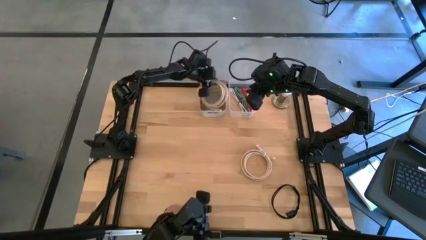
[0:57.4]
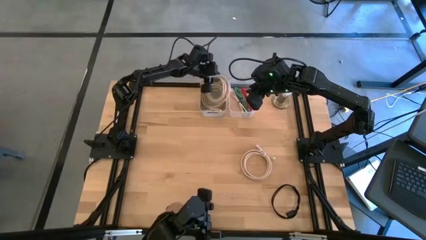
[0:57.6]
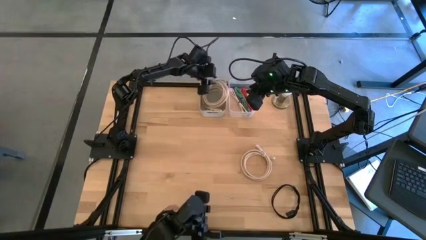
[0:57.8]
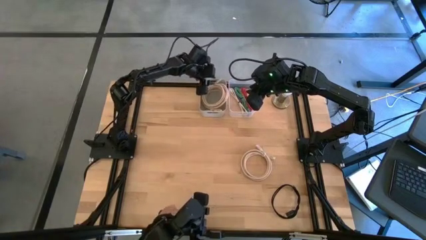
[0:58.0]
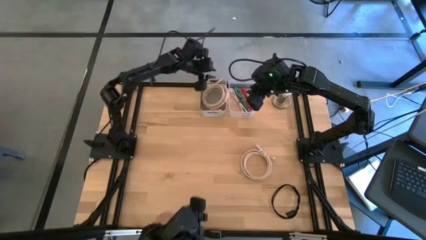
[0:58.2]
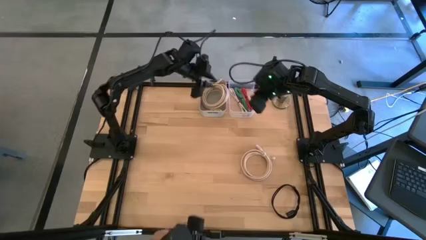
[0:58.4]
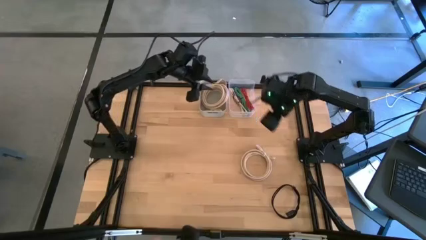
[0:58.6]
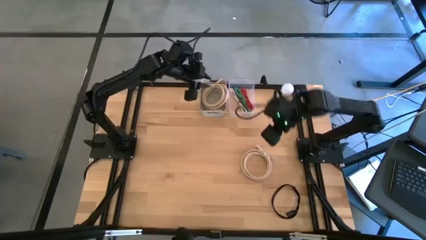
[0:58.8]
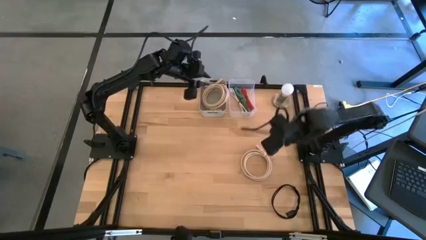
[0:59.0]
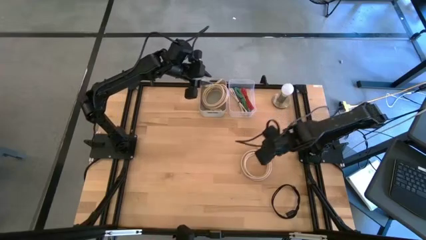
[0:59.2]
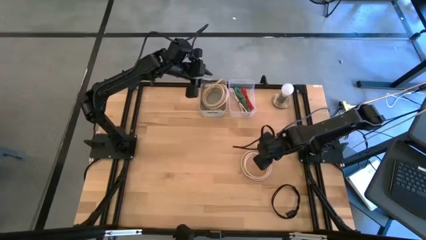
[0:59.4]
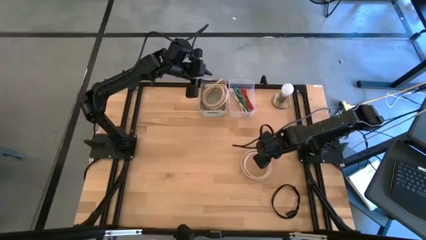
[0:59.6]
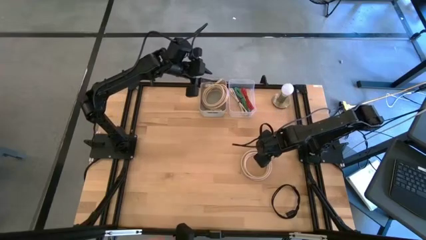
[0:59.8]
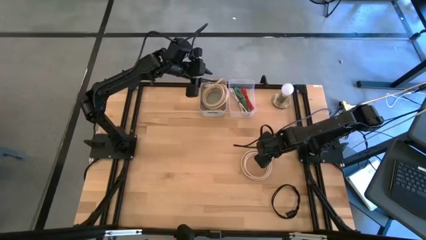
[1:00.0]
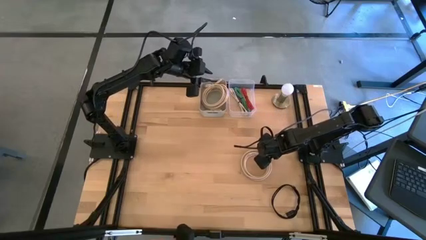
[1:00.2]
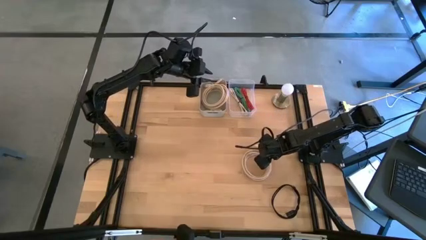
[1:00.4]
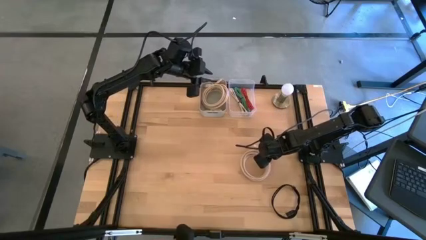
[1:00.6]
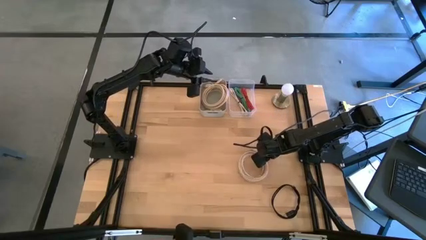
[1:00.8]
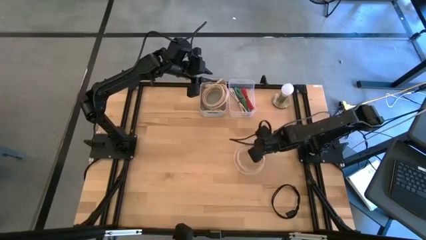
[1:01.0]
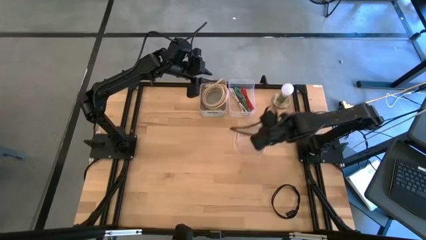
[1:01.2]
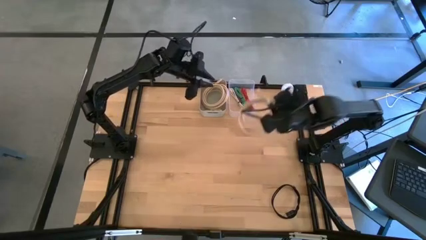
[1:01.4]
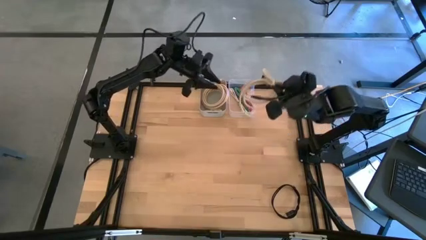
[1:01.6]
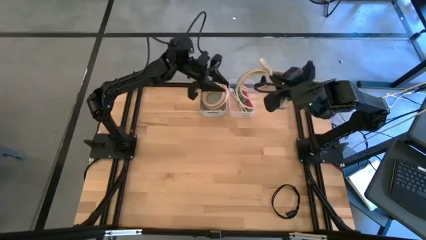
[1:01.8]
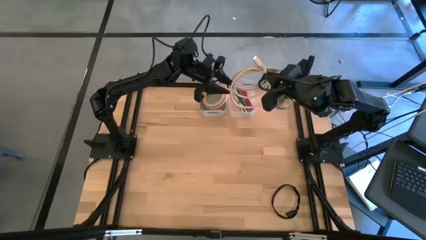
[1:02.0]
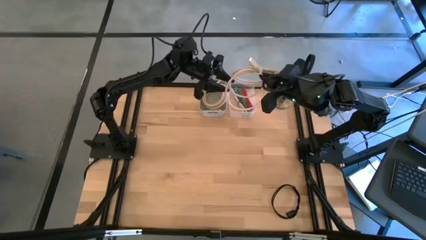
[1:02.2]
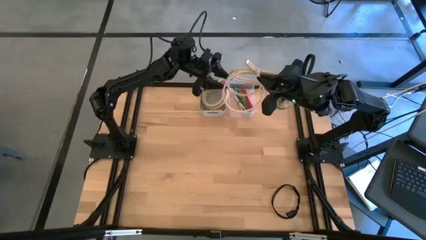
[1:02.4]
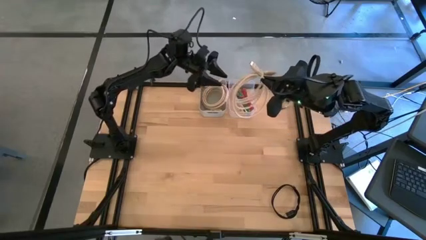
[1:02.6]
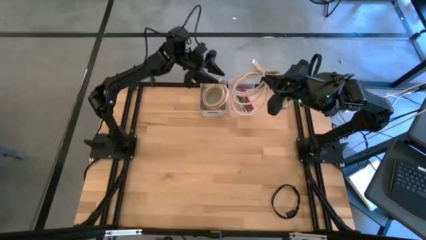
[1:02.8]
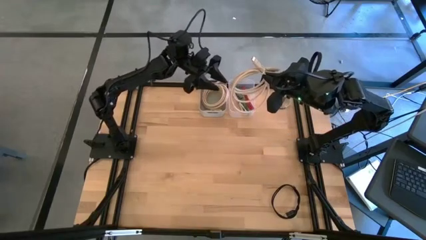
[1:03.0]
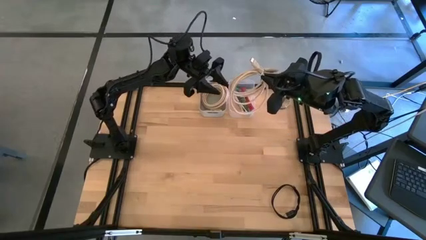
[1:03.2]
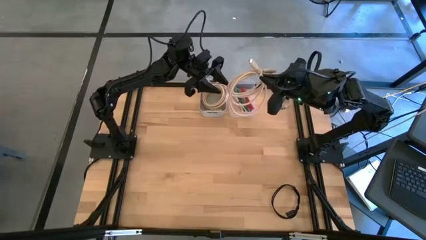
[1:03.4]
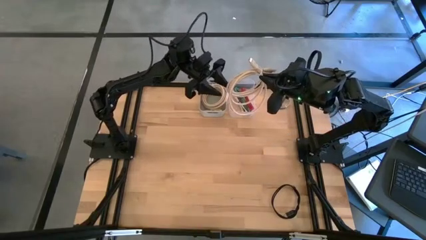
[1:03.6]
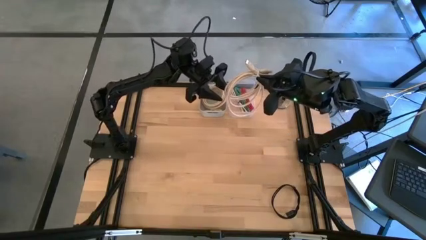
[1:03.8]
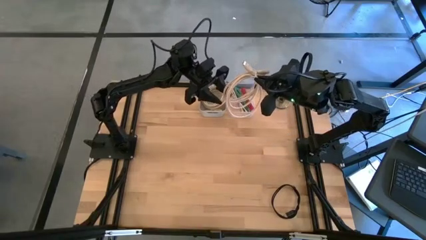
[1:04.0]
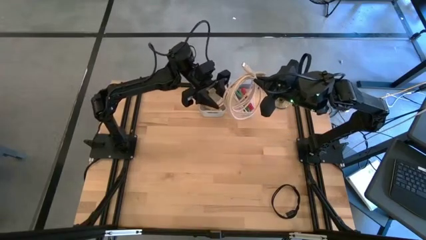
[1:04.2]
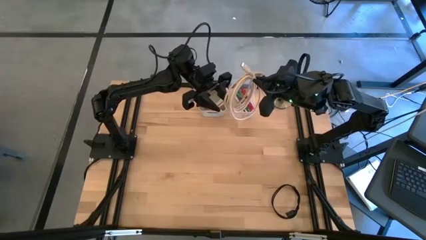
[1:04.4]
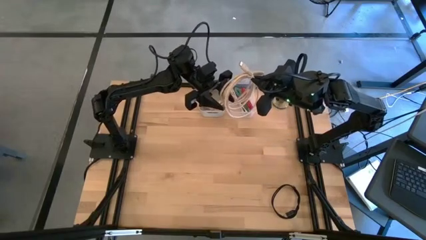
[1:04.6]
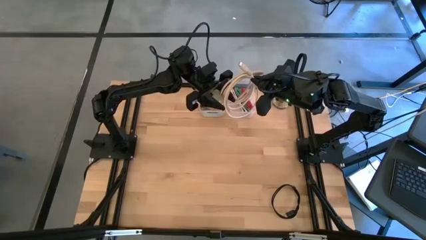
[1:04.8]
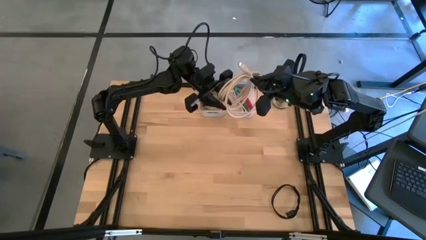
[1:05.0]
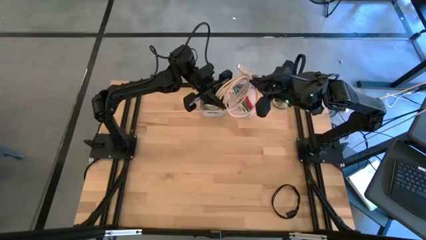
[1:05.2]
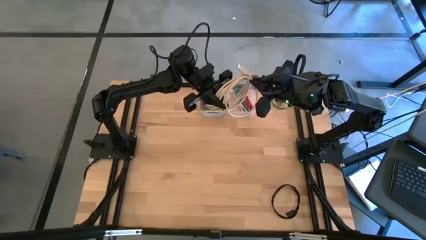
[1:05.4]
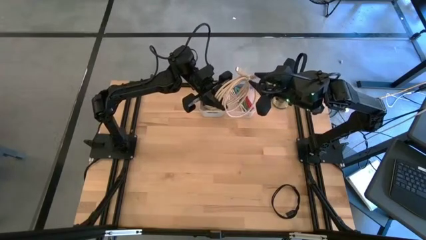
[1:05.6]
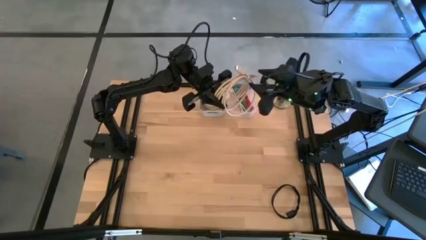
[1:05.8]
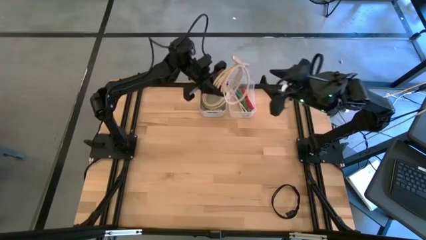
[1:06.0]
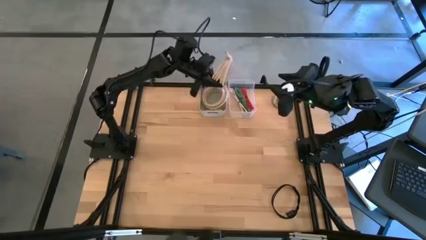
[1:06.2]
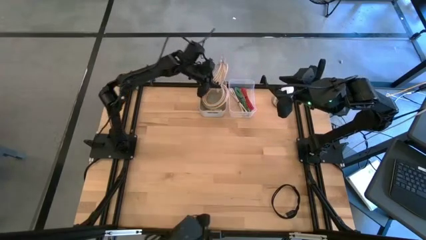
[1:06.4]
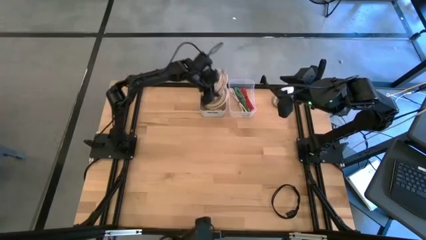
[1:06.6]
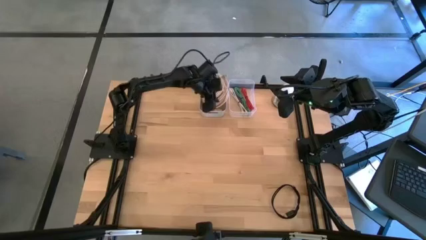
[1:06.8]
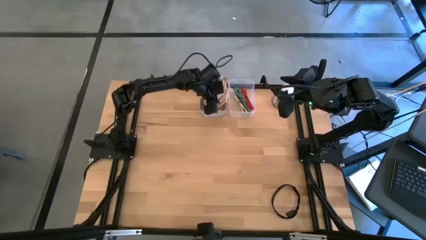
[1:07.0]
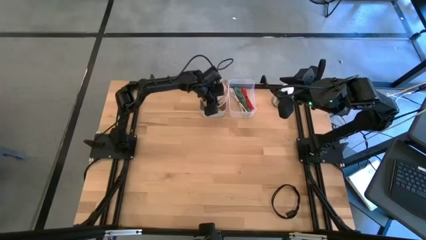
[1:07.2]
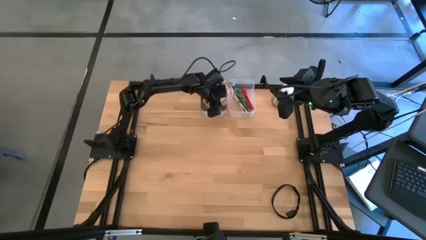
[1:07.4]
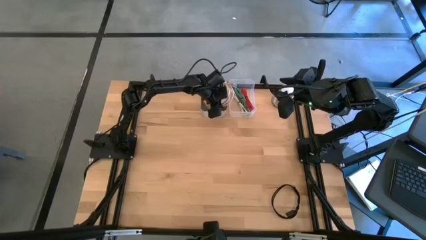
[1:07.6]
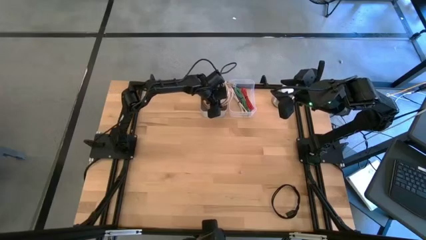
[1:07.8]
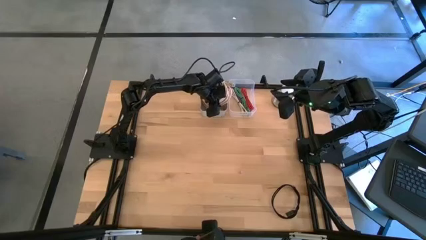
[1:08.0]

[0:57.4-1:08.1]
Put the brown hdmi cable into the white bin
